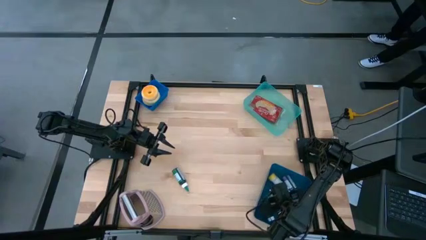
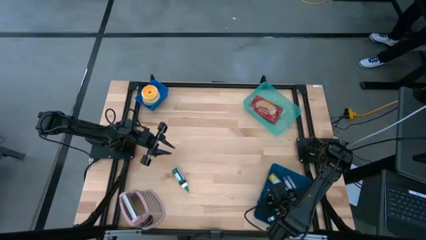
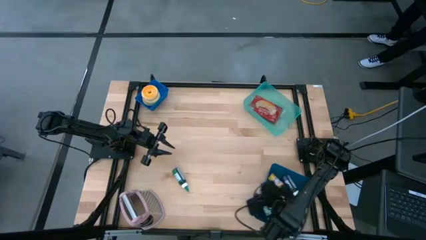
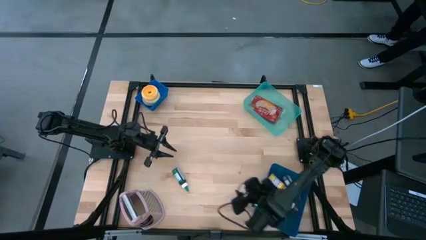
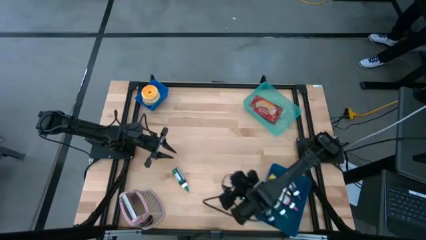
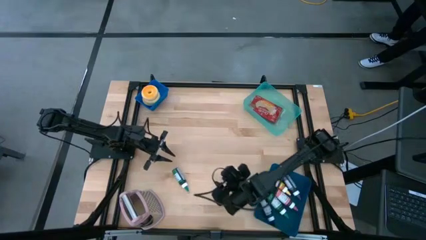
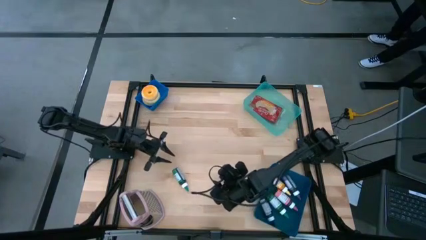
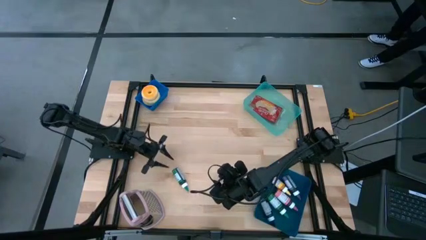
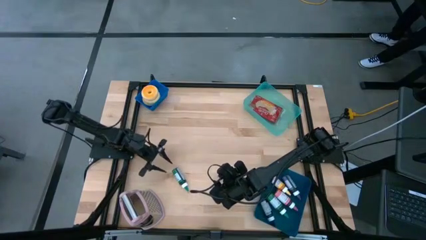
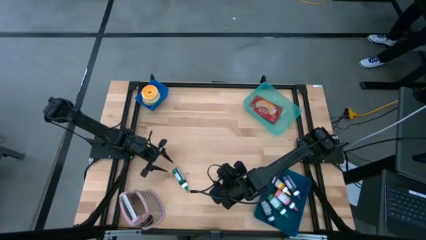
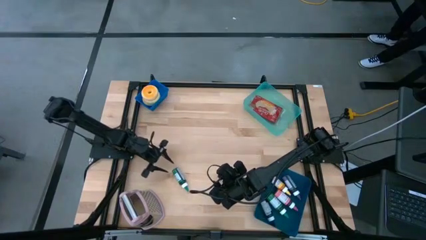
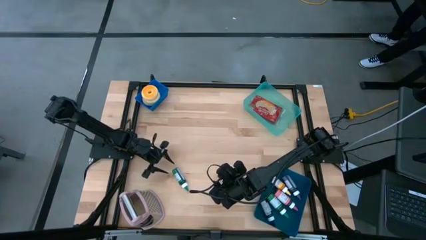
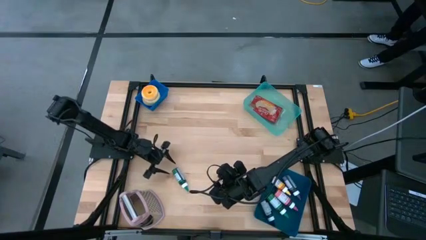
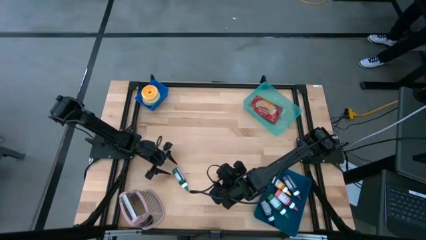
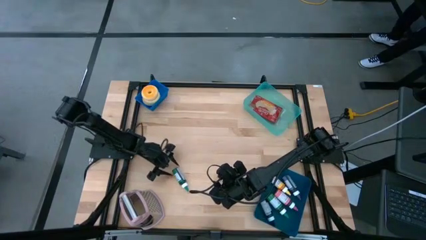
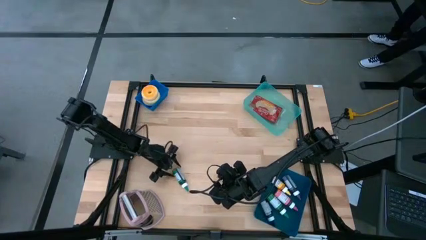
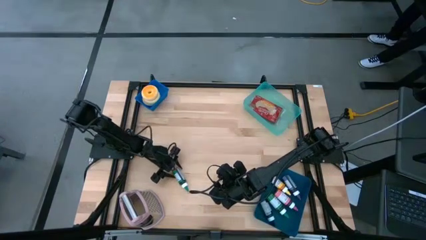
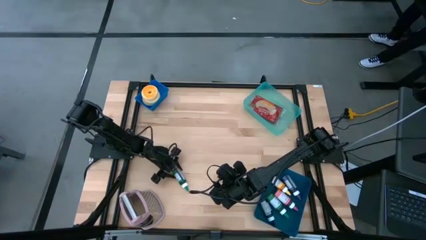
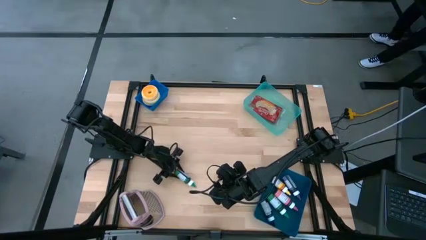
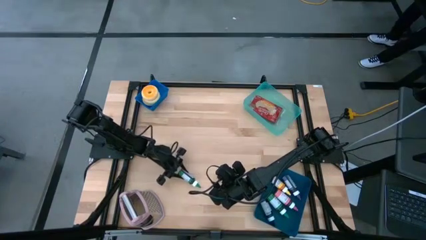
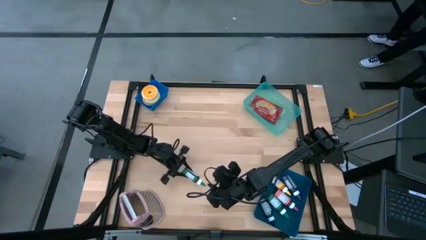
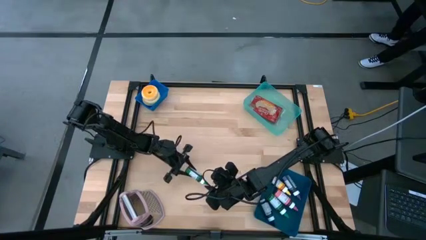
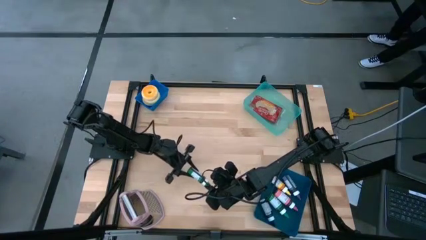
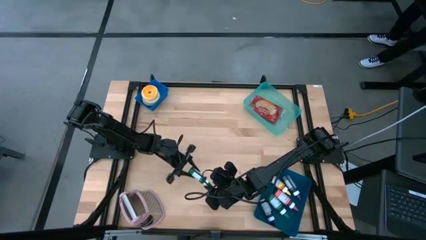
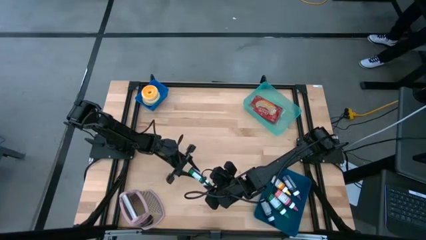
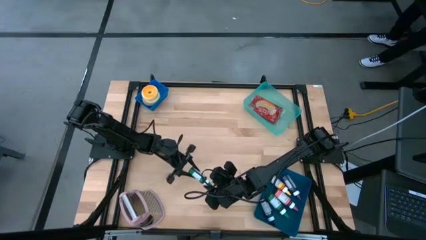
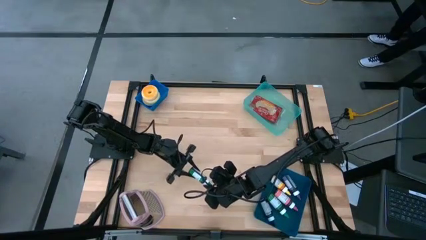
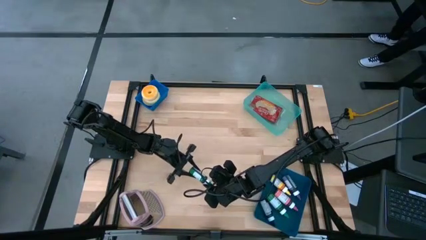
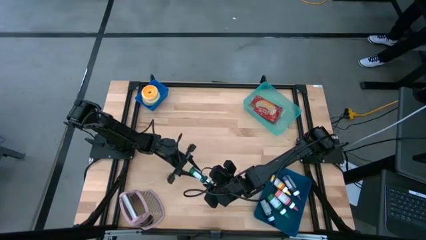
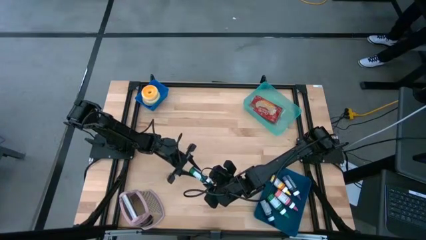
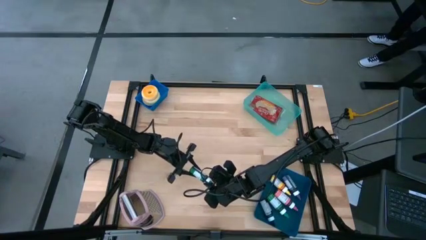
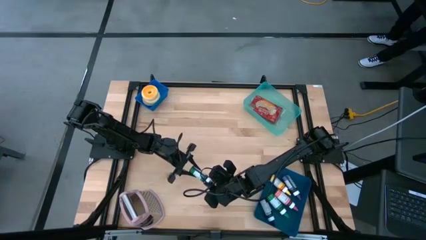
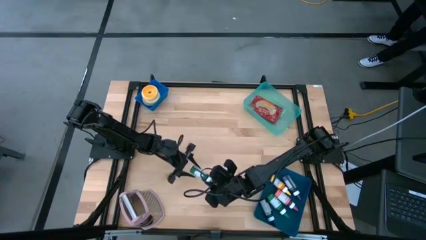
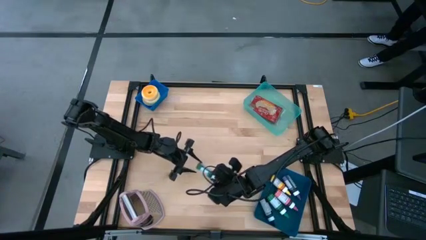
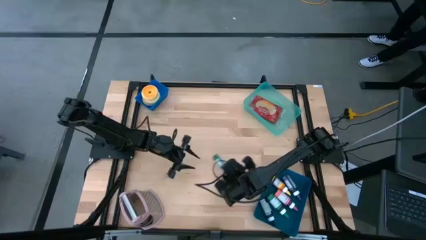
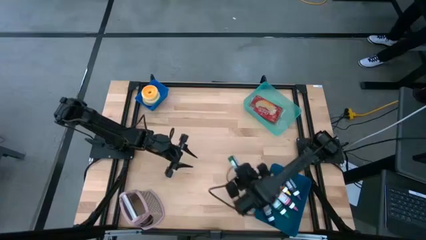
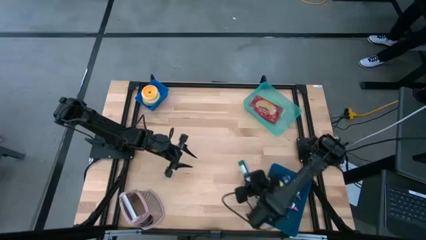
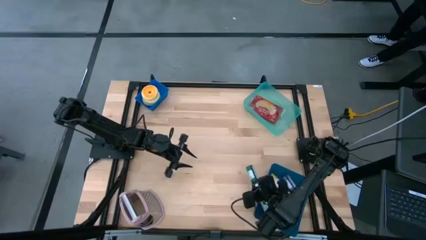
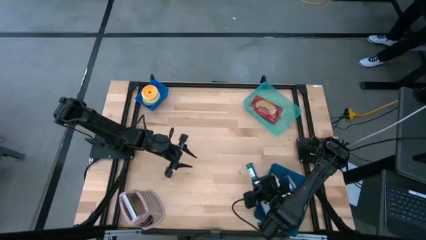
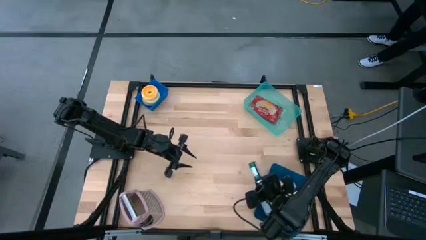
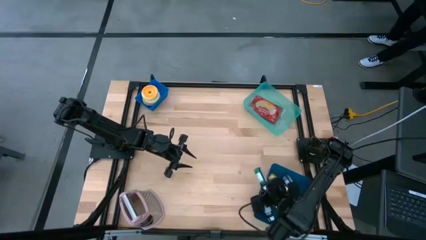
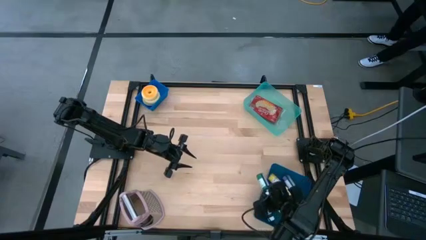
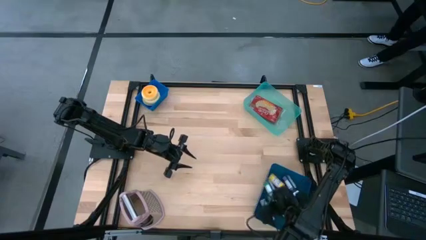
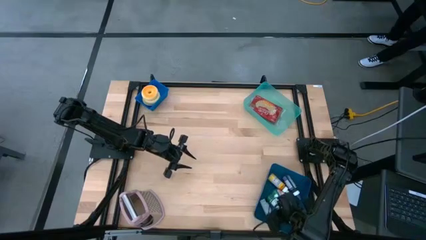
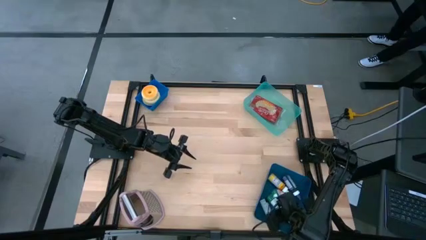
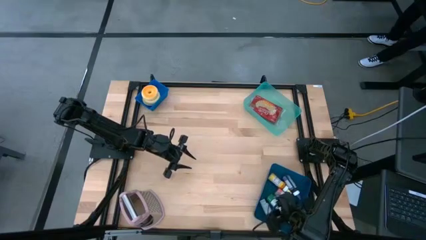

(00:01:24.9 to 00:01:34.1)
Put the green food coloring bottle into the bottom blue bin

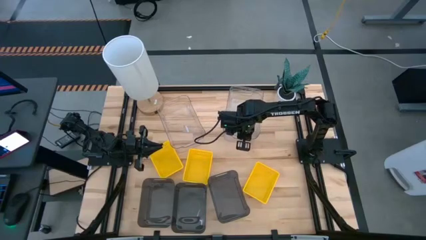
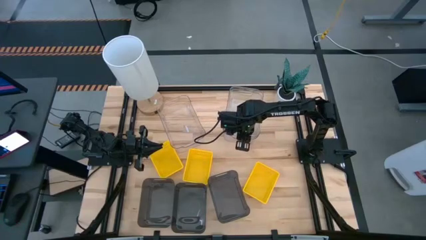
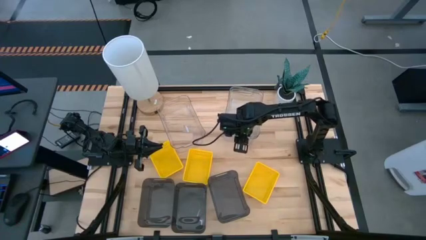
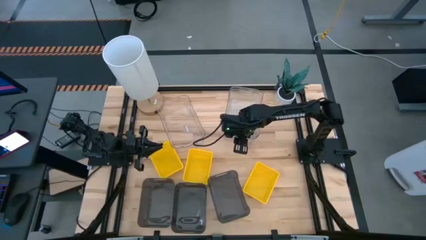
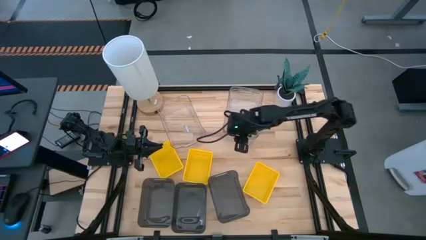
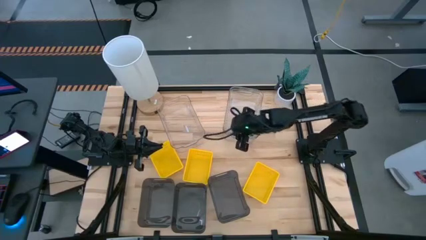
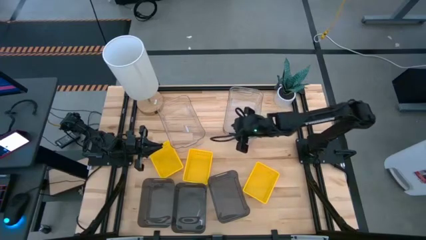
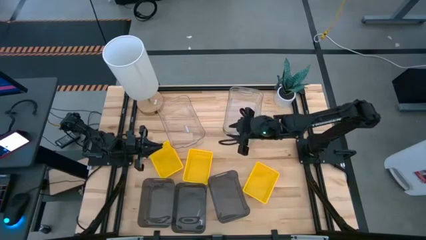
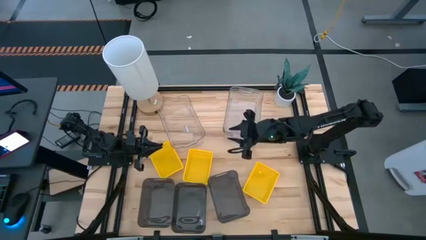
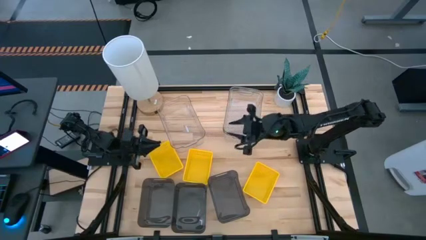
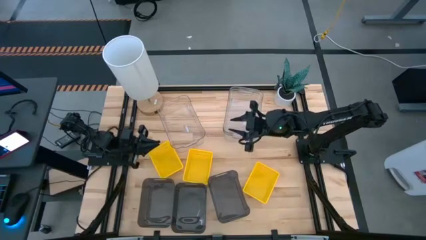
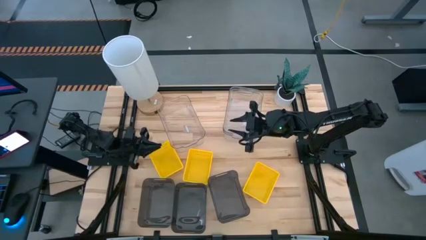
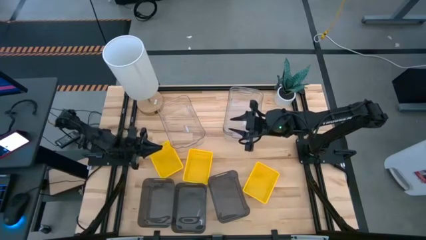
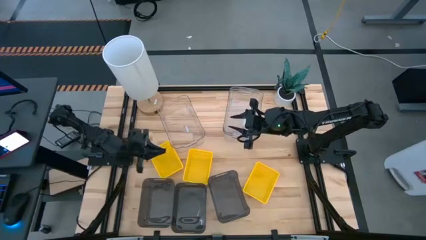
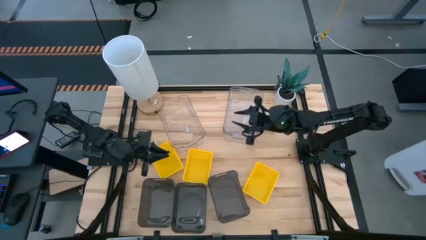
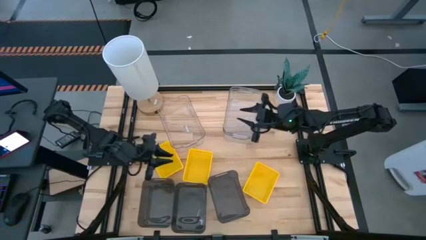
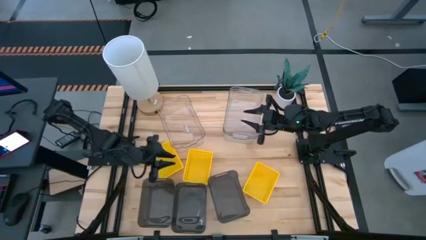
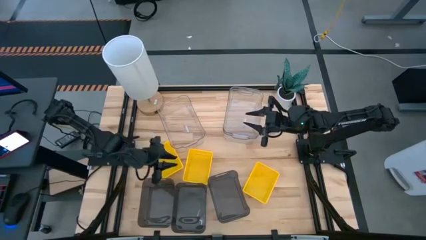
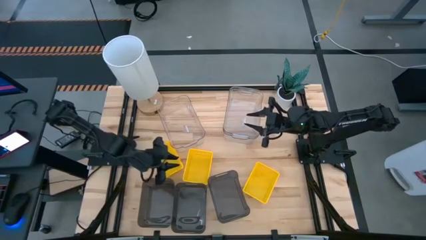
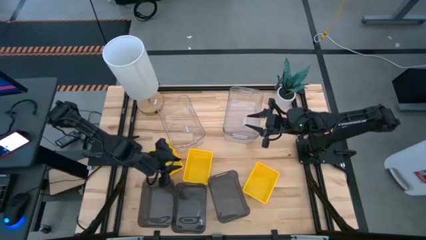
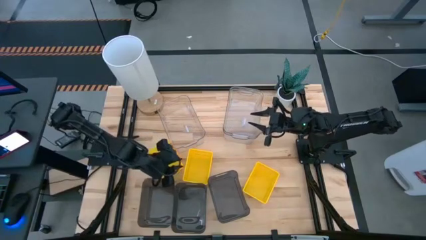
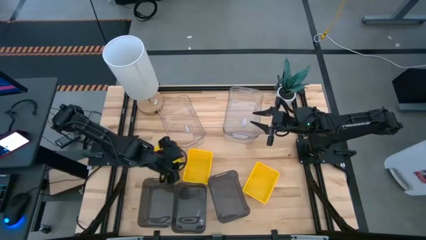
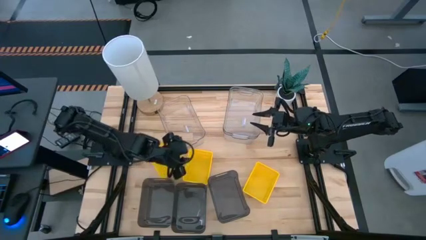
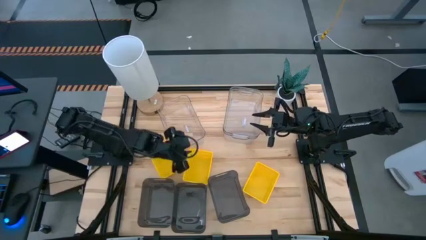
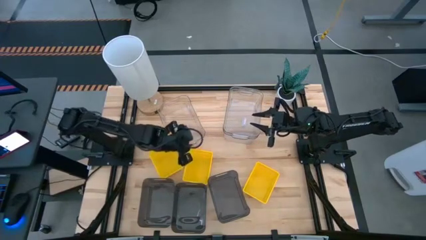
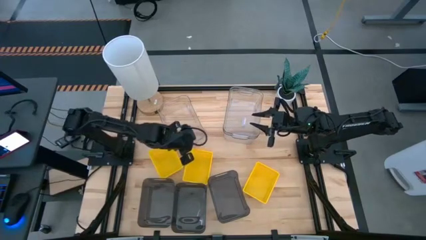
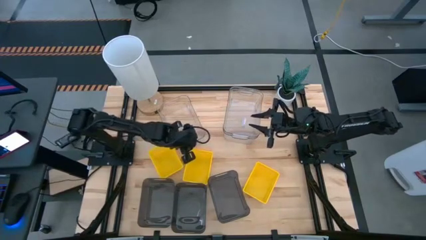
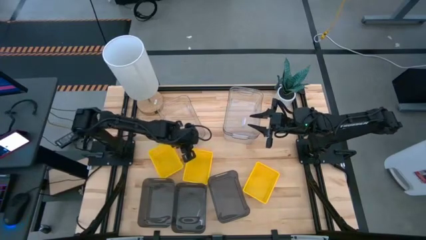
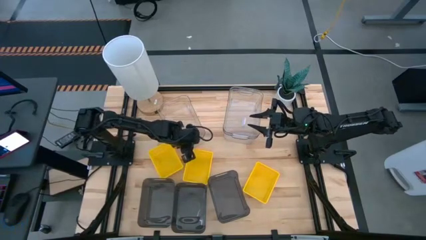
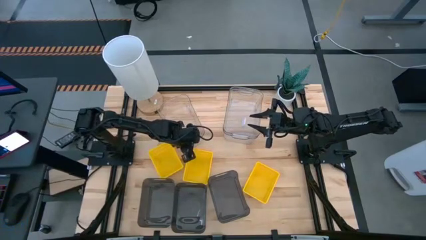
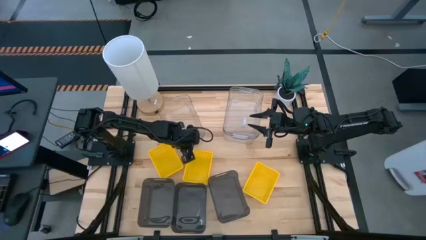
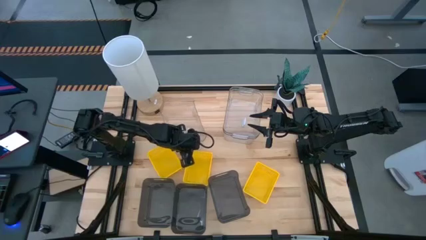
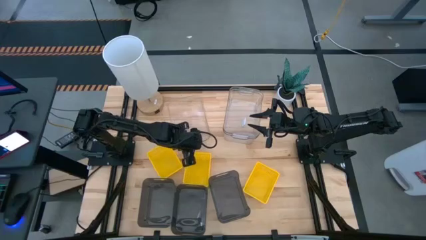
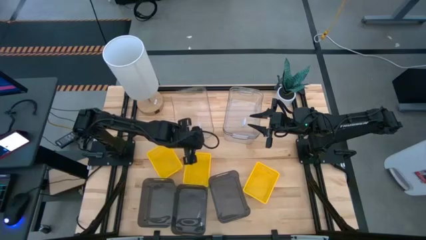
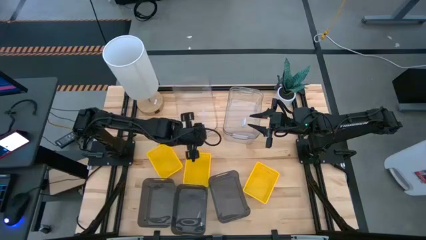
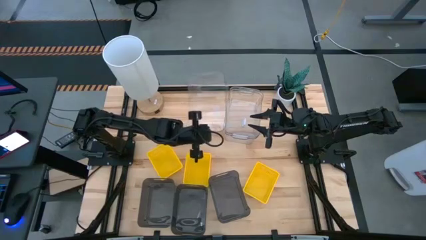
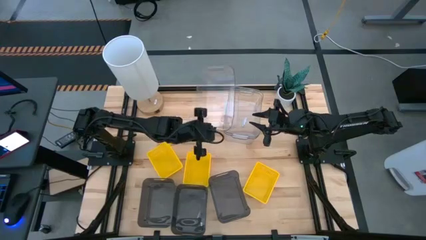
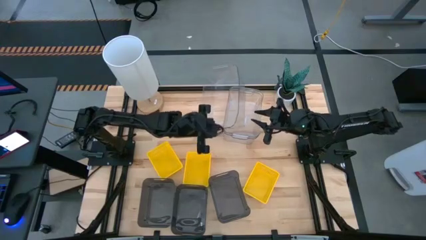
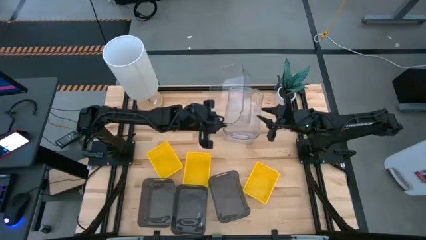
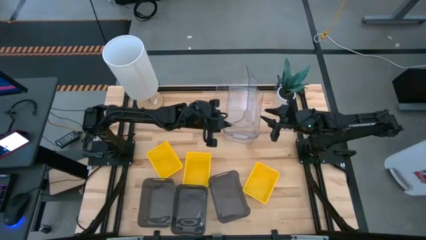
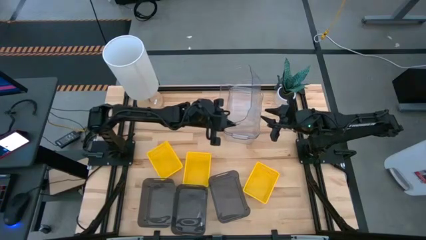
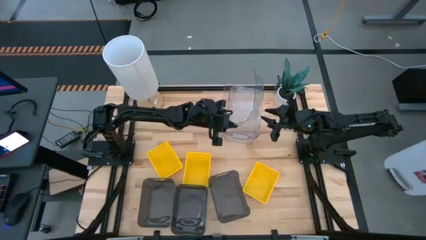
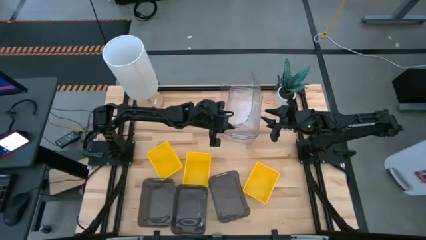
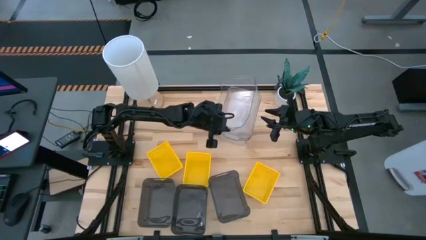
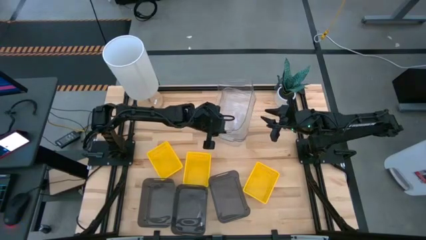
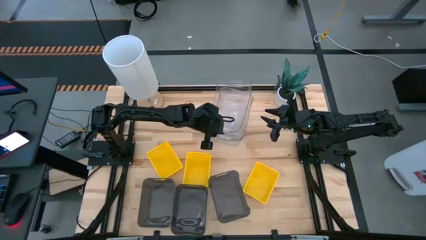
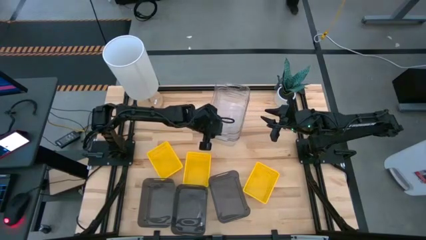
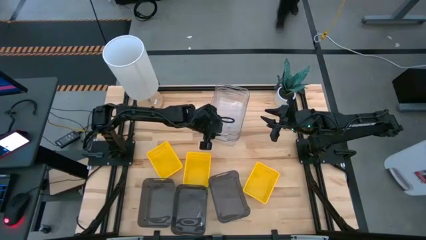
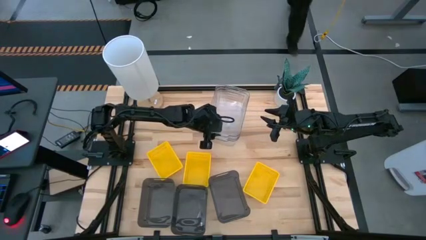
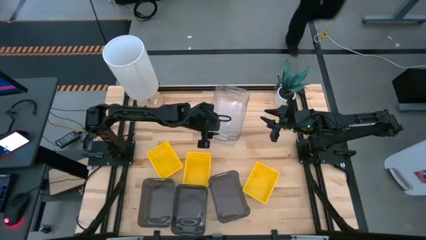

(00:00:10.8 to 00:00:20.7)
Stack the transparent bin on top of the transparent bin
